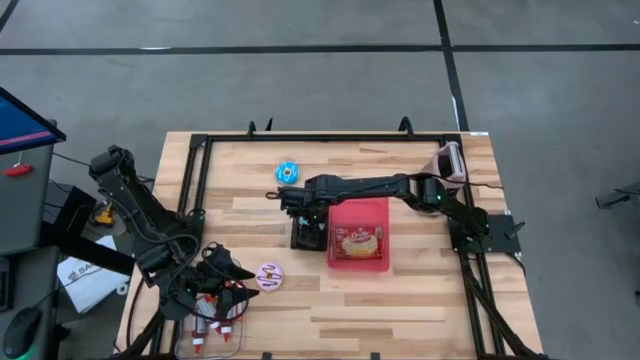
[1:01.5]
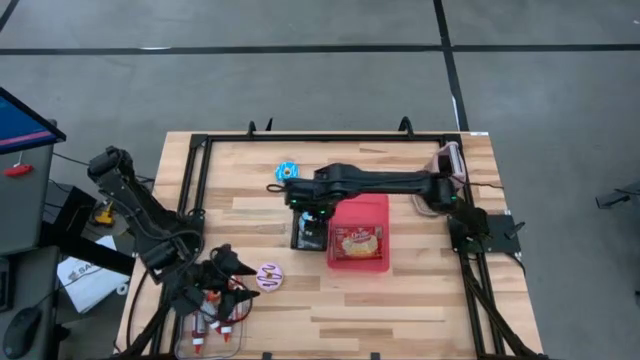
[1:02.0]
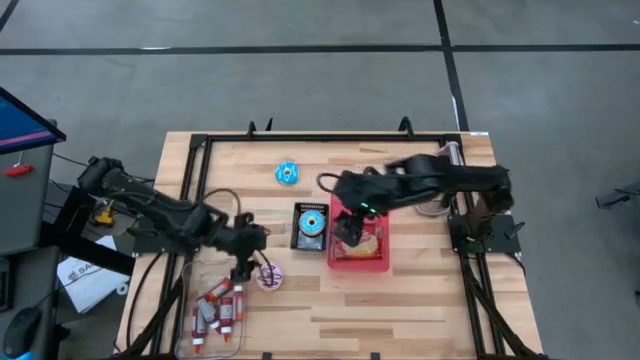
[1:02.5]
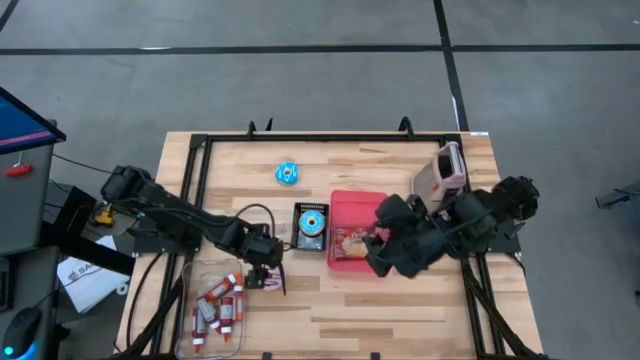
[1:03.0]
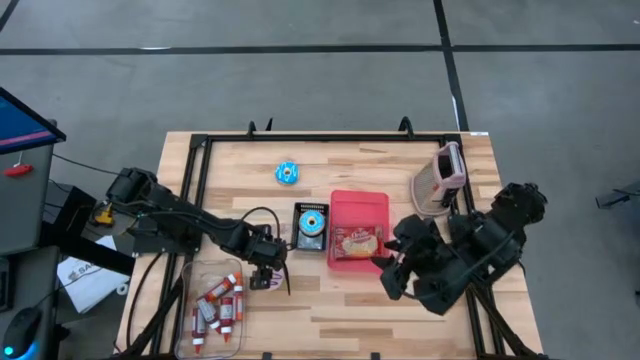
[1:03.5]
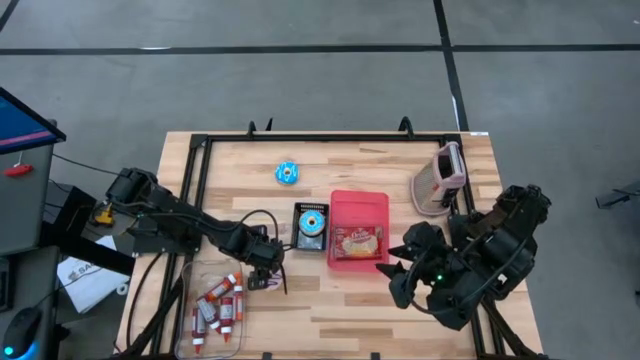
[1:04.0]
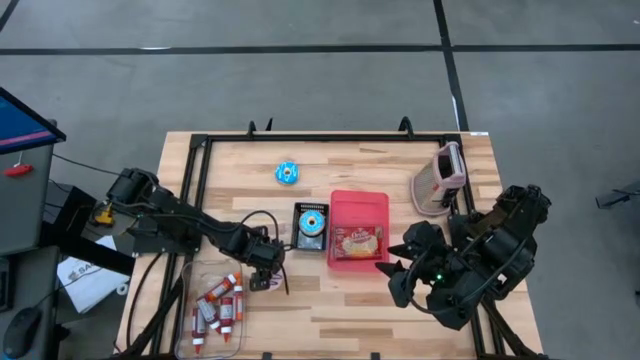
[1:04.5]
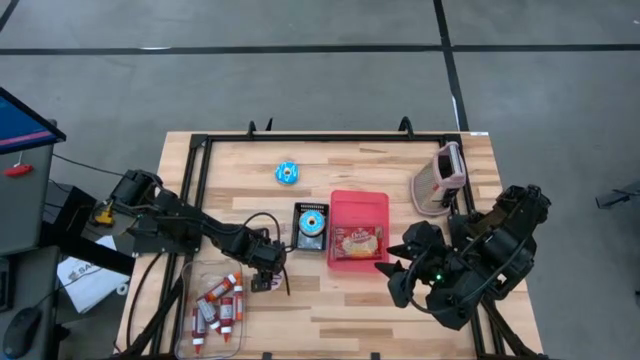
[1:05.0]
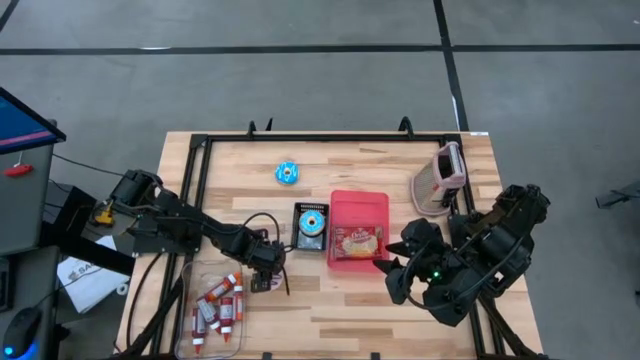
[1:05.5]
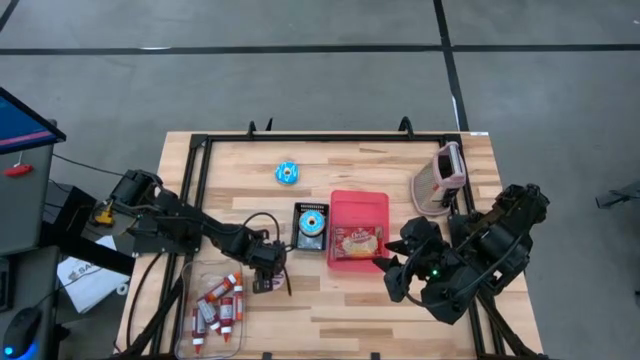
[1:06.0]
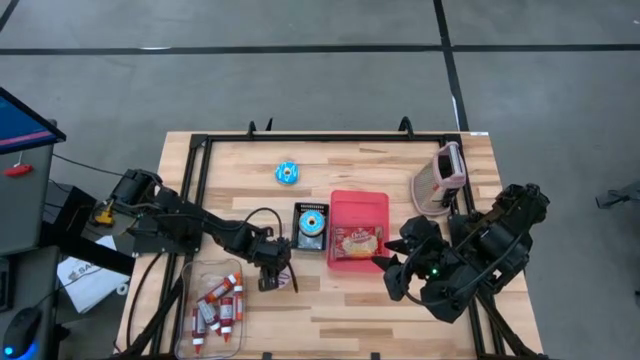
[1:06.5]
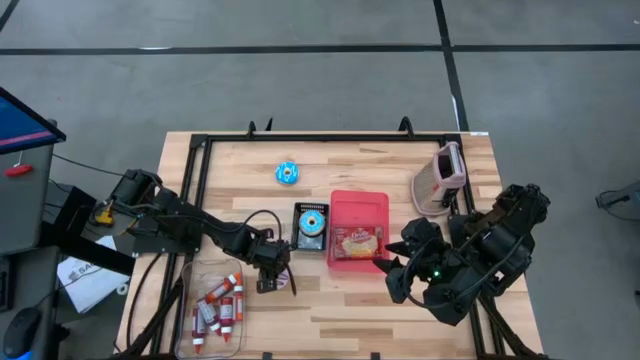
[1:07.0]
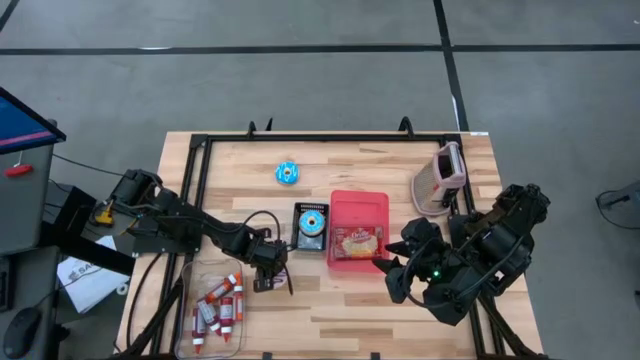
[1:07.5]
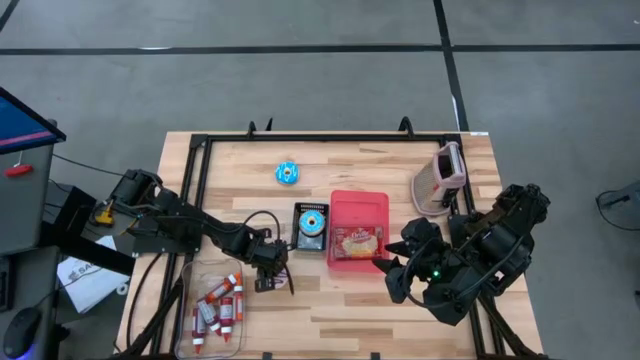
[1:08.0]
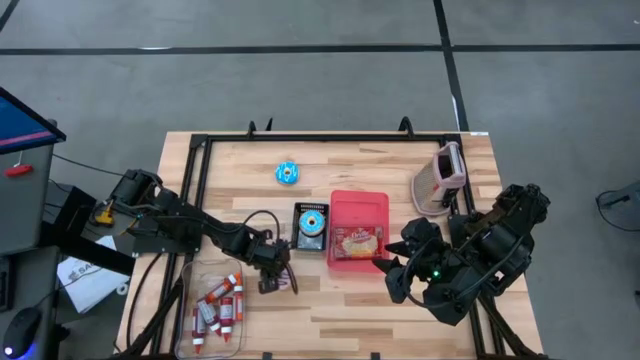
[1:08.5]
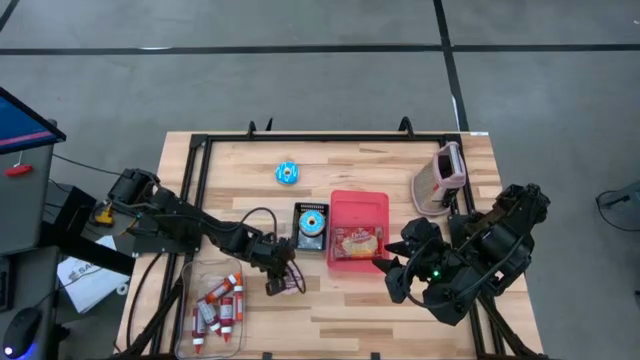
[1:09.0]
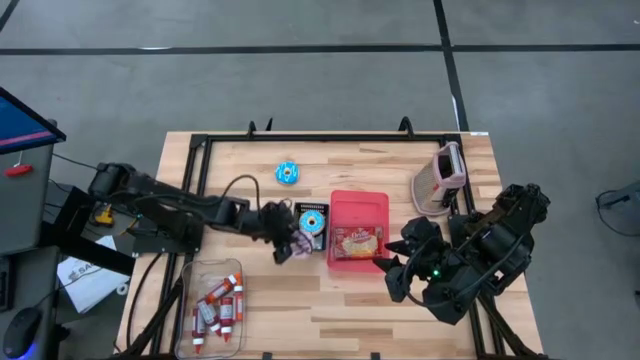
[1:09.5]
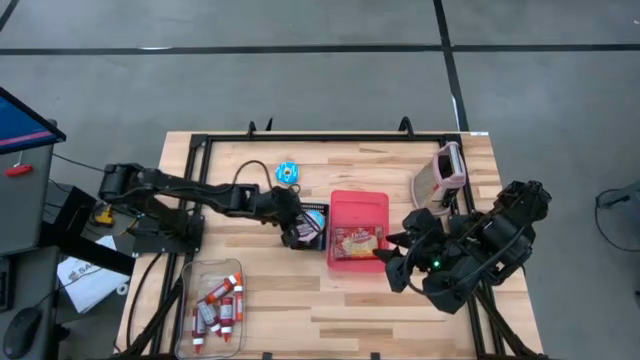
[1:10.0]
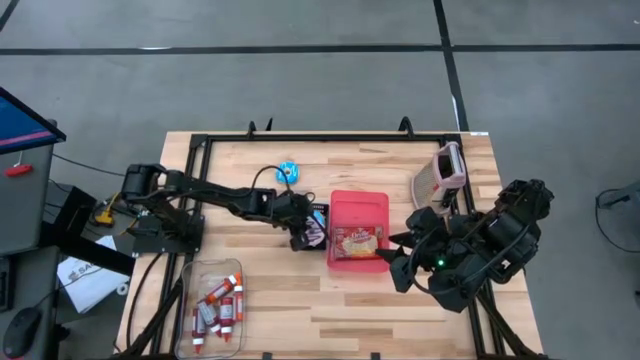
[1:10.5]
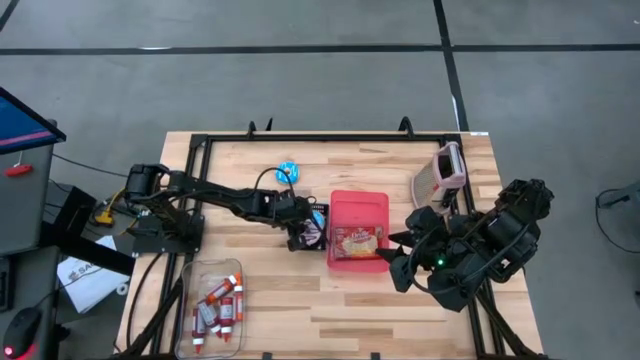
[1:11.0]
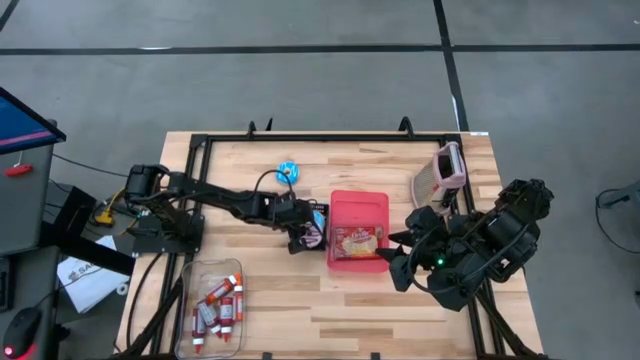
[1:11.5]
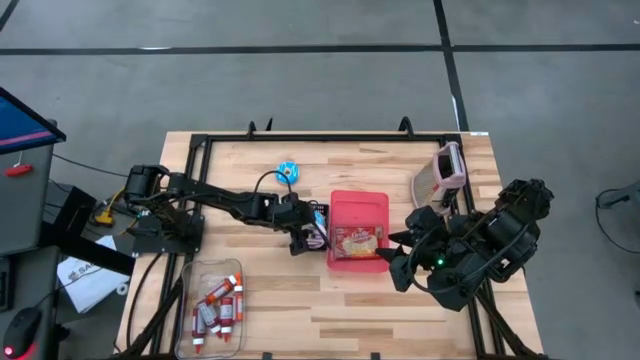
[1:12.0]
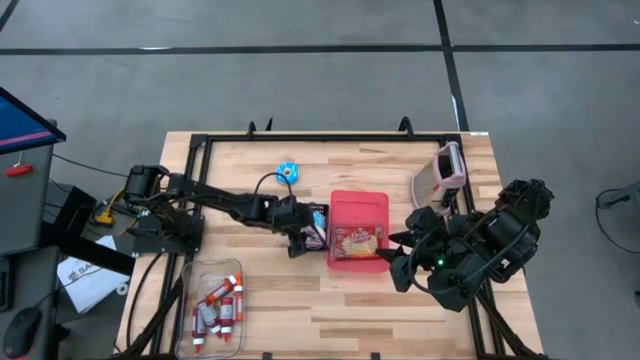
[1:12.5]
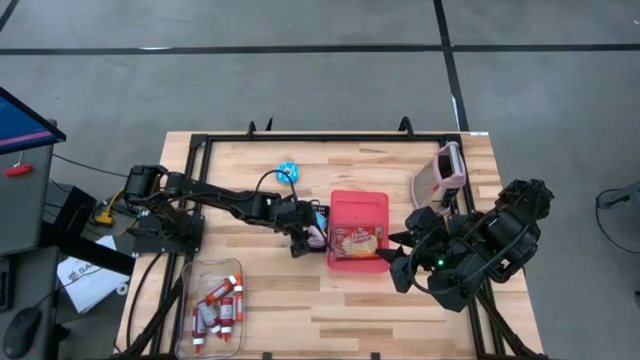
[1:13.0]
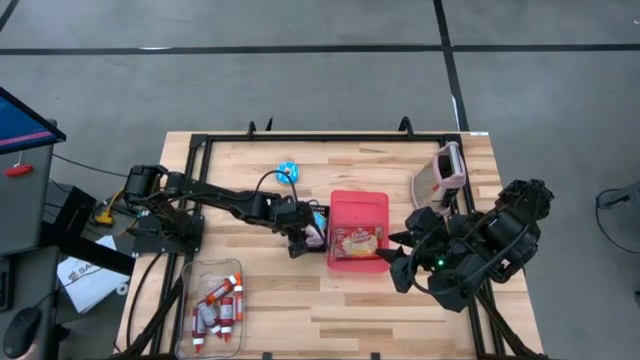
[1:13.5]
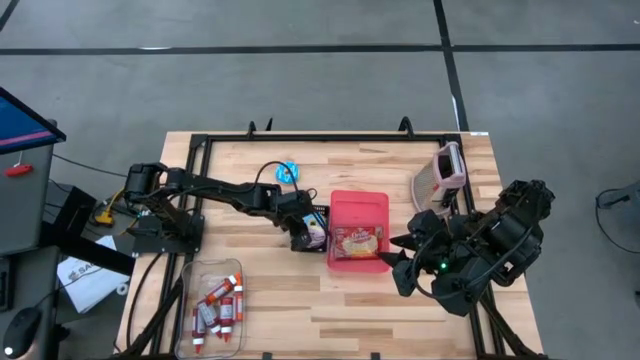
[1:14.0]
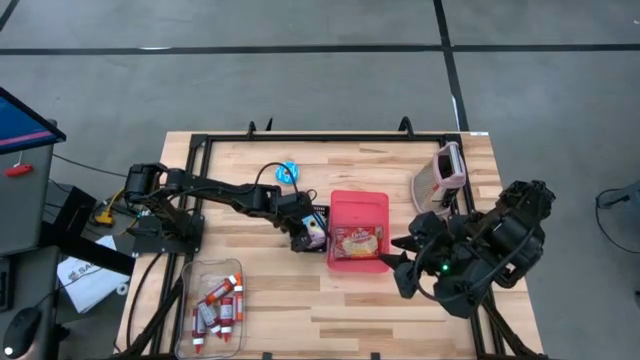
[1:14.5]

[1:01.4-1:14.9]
Put the violet donut into the black bin
